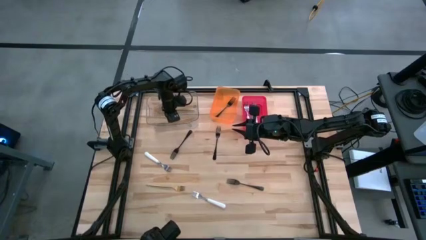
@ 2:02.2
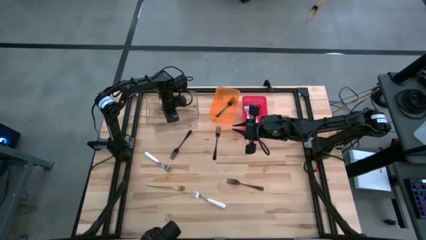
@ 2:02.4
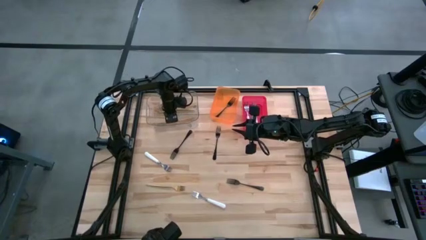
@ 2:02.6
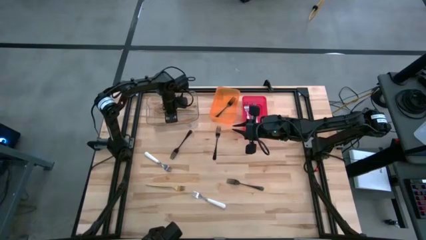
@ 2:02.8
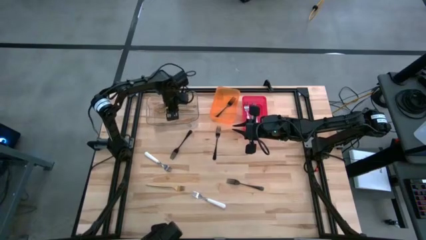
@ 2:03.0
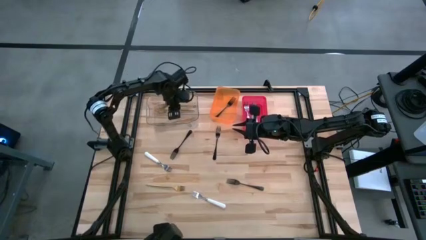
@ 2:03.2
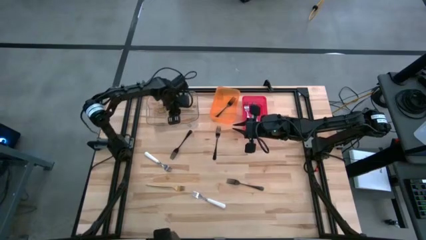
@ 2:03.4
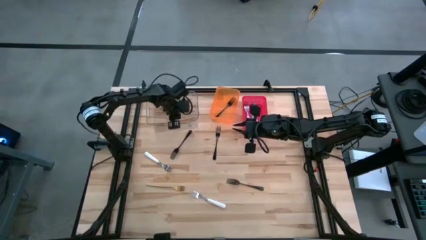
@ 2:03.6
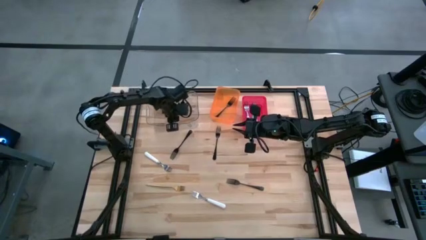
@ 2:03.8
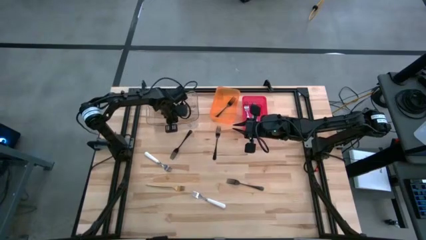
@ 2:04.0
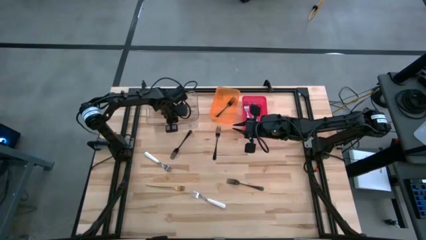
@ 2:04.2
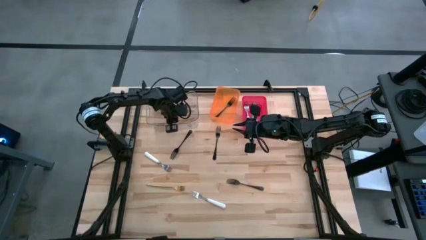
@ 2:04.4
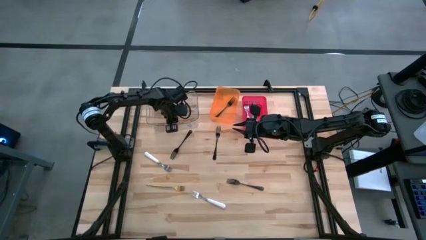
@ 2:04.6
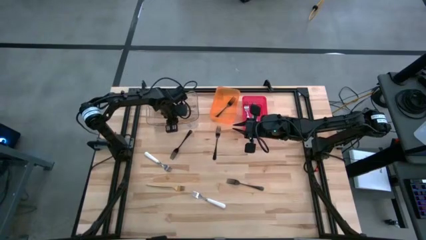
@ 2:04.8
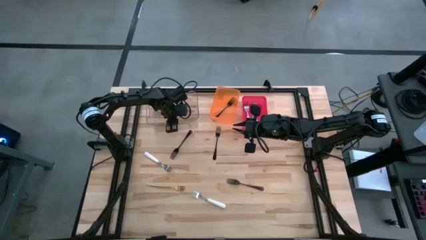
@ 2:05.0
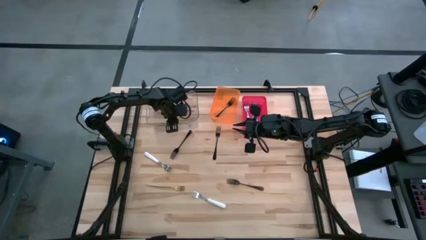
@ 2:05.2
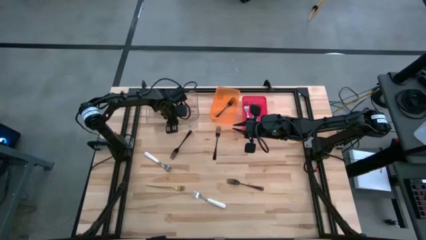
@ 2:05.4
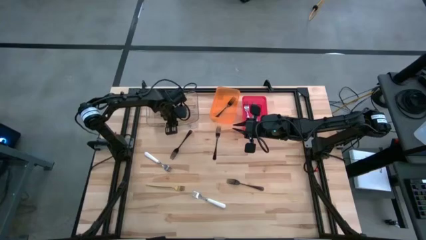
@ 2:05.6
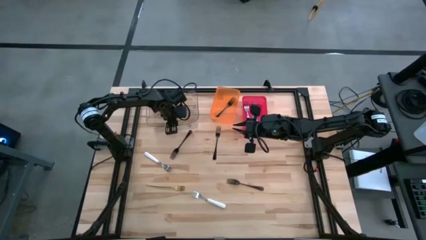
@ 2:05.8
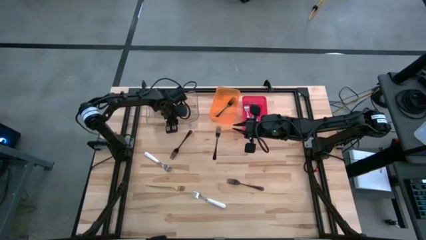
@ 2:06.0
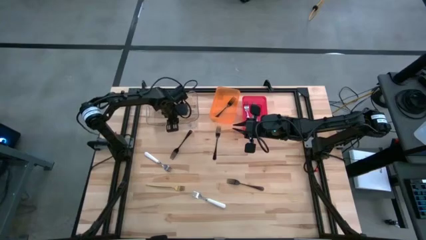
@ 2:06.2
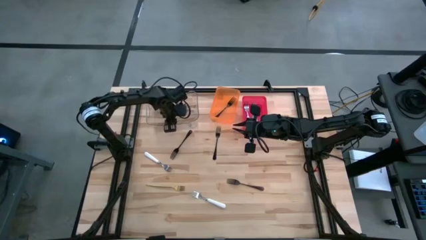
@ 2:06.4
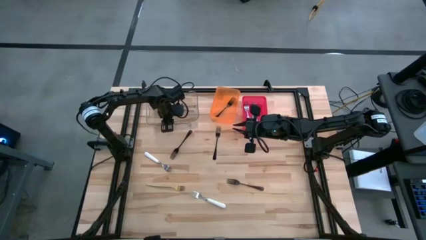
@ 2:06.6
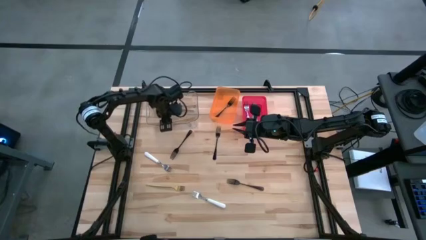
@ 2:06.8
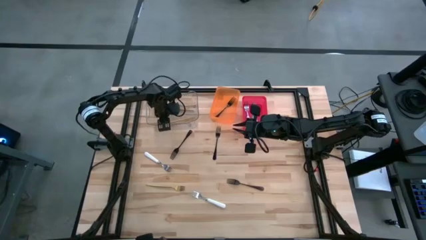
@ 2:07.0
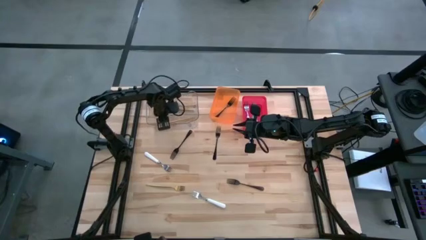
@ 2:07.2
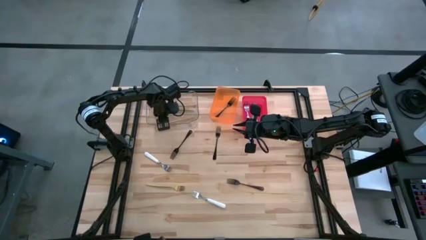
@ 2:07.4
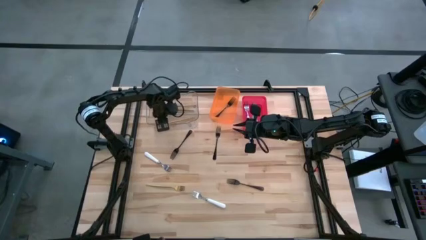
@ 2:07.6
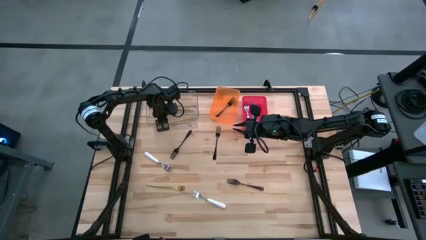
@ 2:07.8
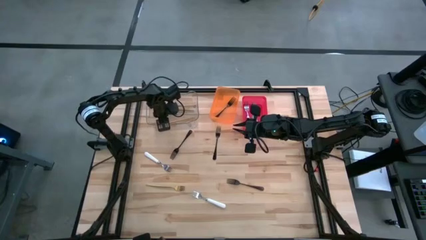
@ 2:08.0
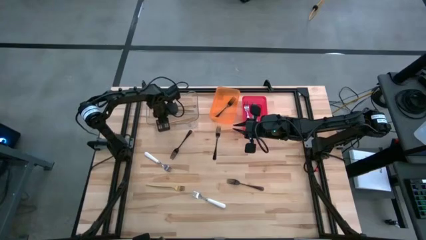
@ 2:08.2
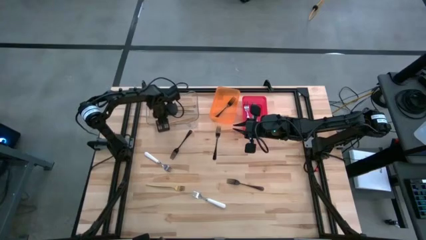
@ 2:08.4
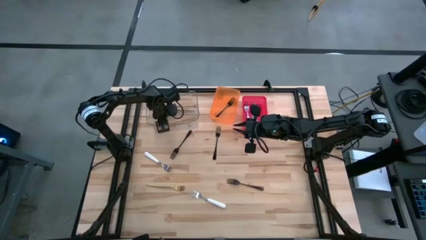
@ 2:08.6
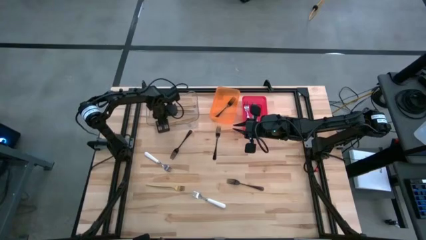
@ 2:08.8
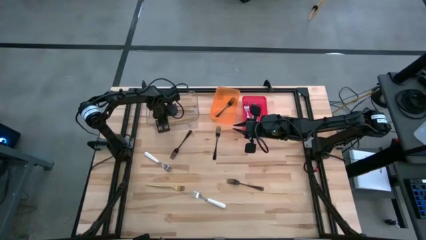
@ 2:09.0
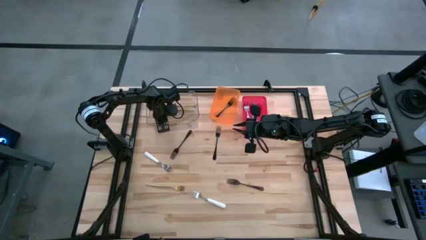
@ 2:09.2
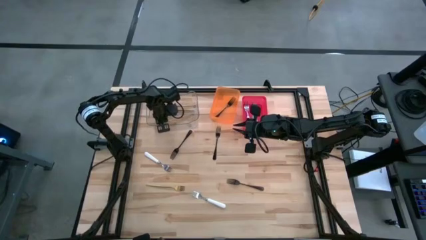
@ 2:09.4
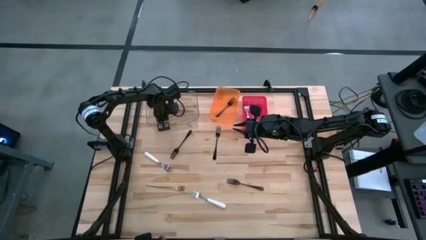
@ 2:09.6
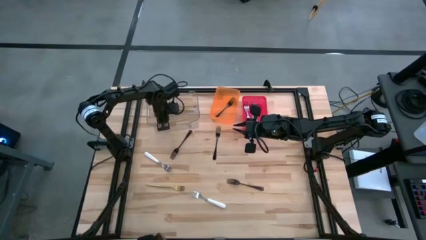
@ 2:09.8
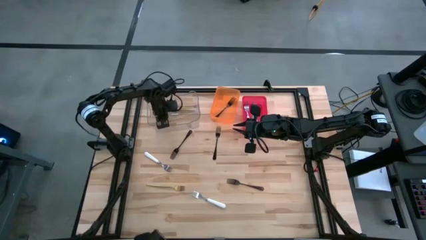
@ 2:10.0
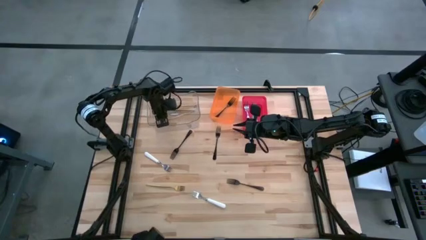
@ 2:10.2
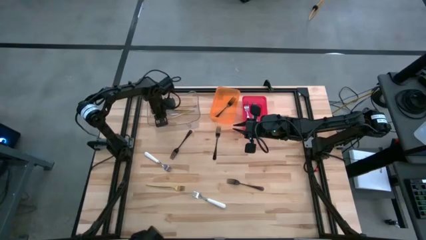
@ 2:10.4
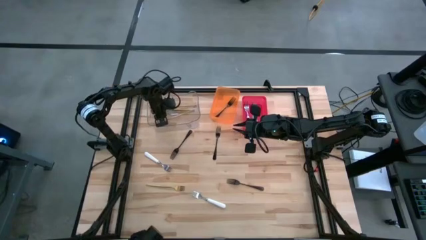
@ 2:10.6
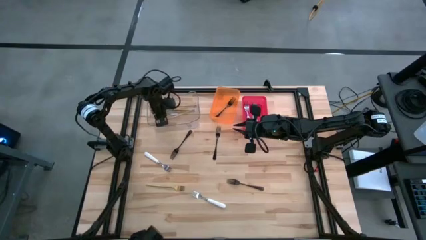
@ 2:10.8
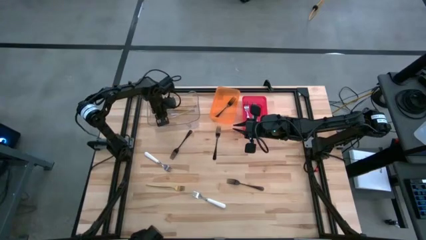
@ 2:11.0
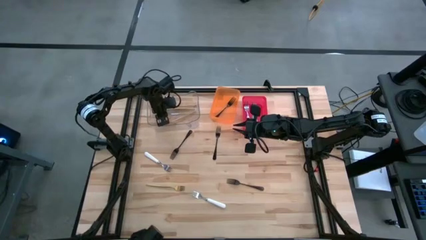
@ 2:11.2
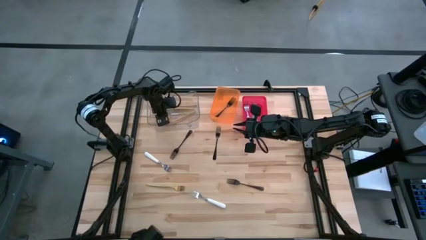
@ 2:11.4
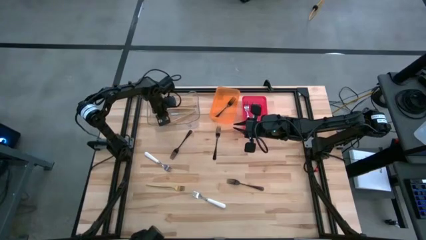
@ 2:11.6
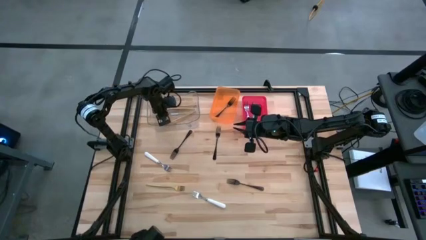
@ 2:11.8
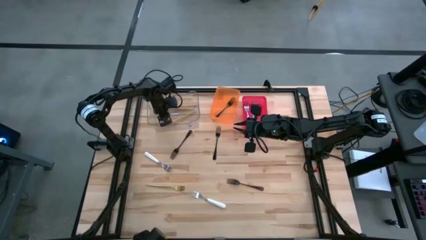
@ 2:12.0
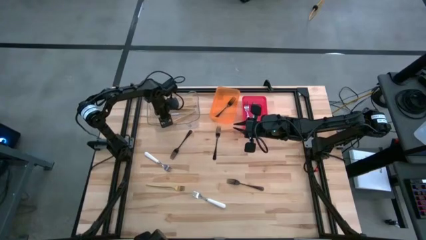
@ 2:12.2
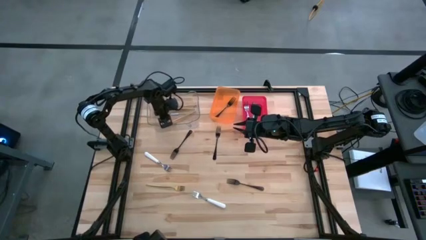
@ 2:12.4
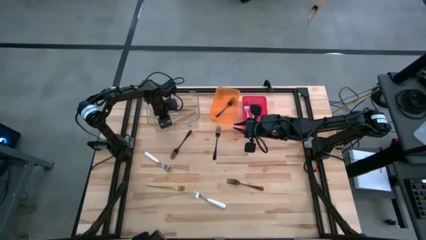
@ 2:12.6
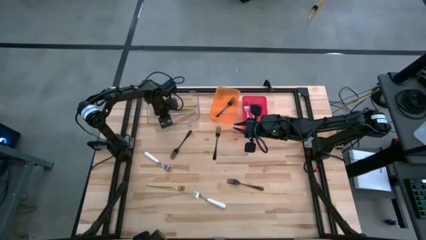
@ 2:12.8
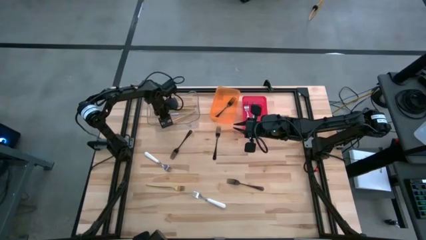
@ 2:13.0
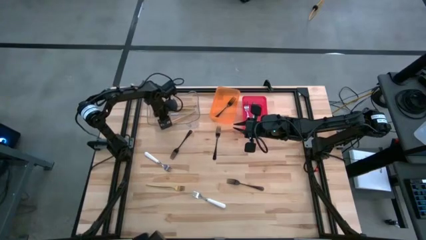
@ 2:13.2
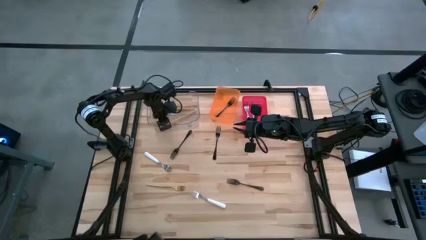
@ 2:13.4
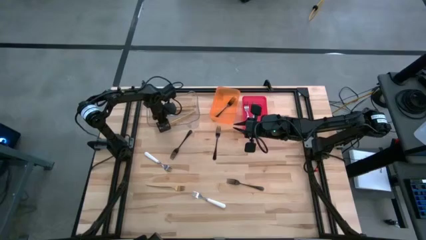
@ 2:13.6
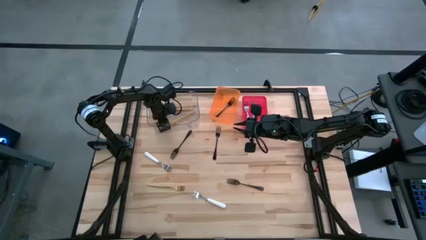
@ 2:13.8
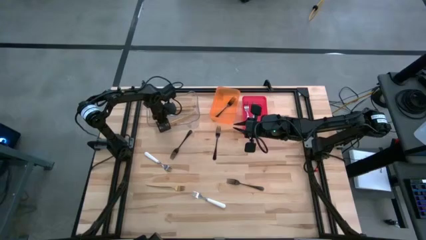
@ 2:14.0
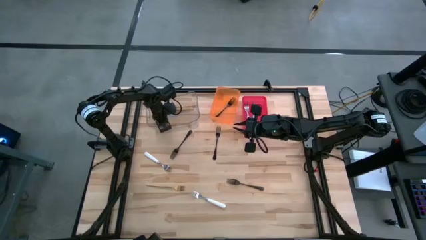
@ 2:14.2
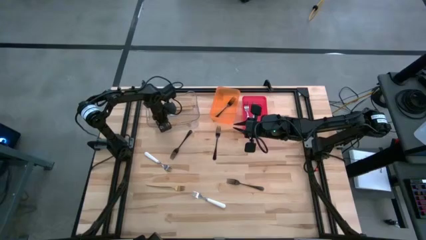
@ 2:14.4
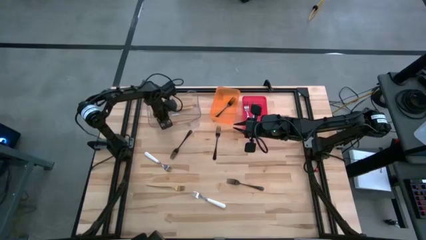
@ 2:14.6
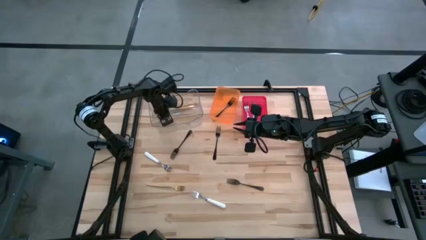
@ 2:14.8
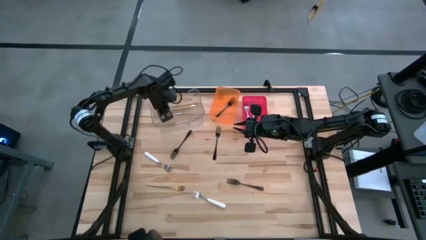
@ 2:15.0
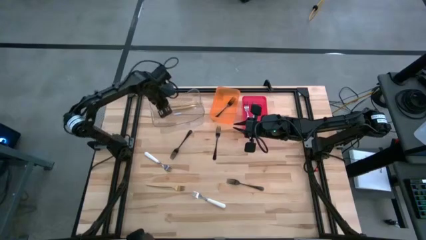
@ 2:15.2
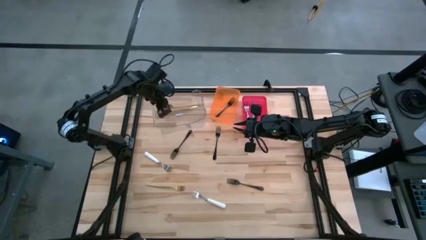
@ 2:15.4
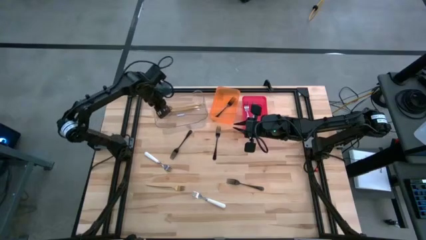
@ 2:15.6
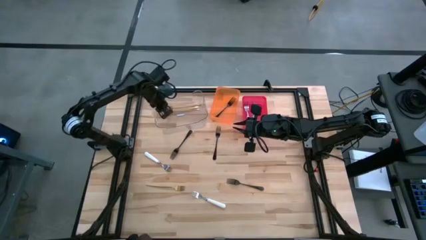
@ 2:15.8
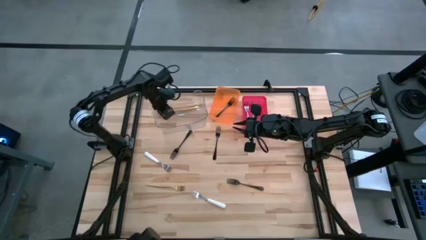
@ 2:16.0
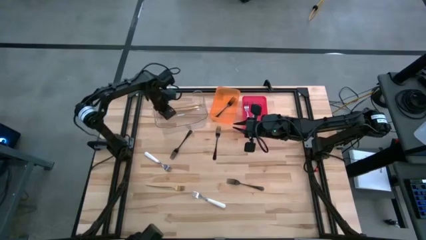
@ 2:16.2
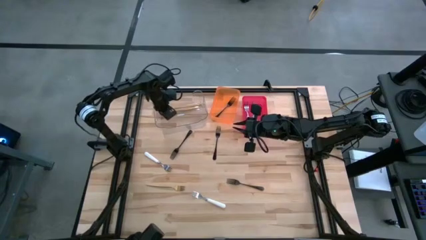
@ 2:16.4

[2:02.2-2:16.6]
Task: Sort silverware by color (type)
Put the gold fork into the transparent bin
